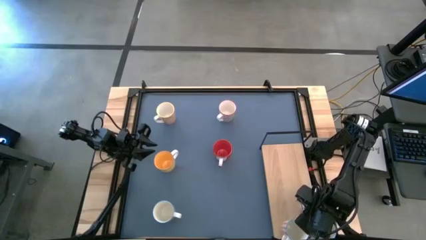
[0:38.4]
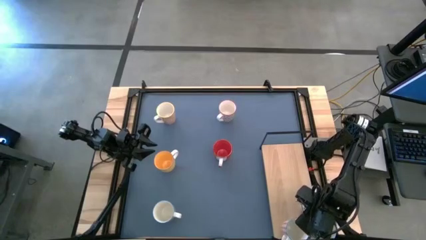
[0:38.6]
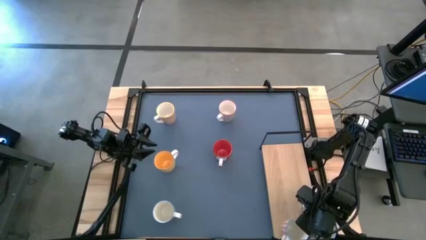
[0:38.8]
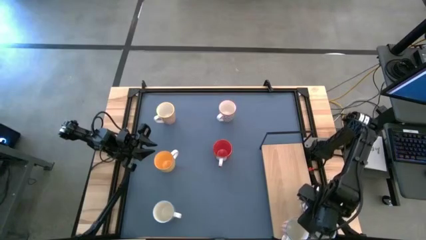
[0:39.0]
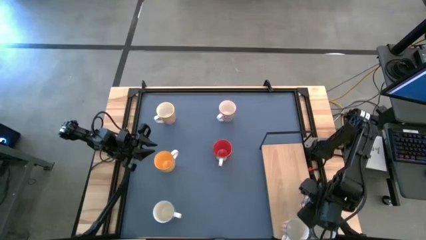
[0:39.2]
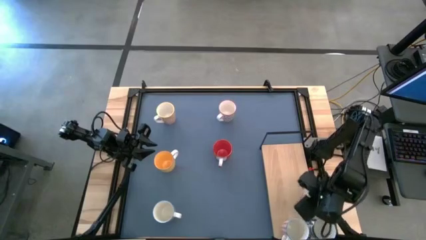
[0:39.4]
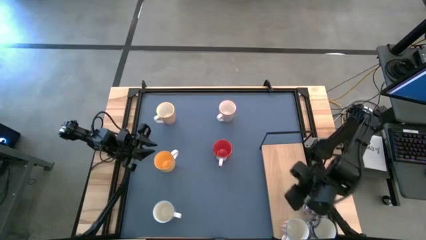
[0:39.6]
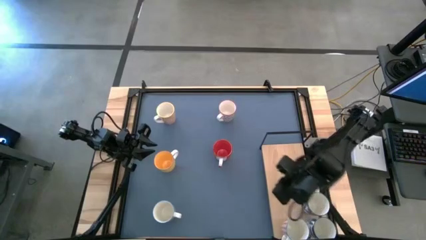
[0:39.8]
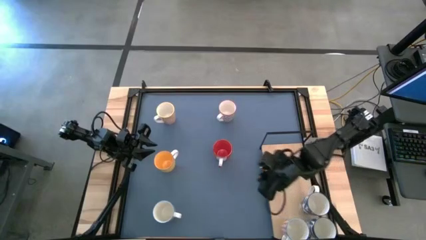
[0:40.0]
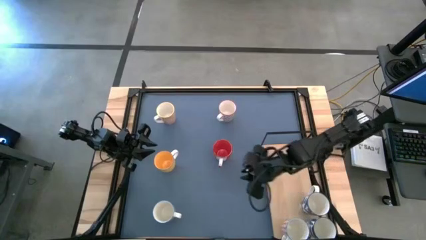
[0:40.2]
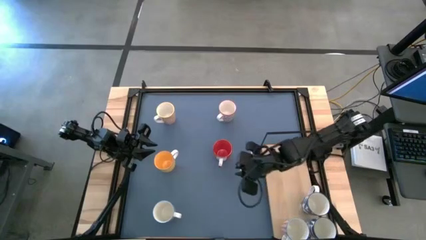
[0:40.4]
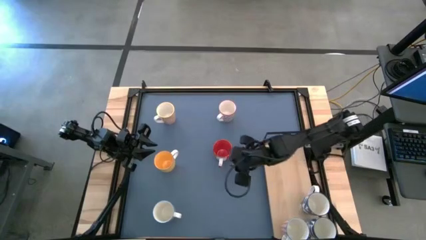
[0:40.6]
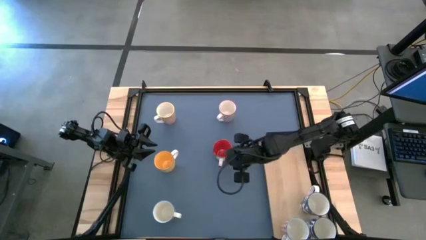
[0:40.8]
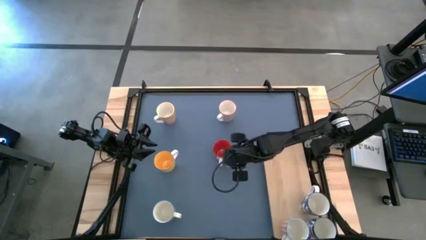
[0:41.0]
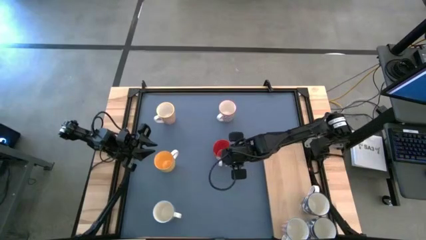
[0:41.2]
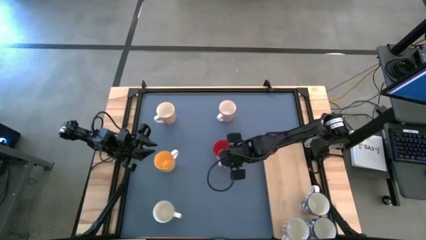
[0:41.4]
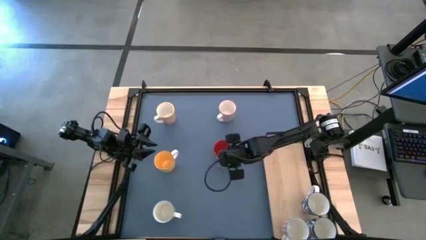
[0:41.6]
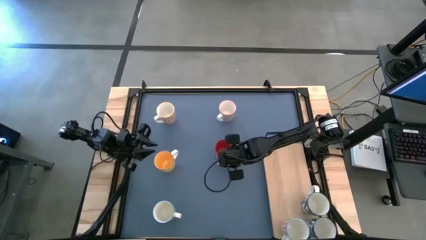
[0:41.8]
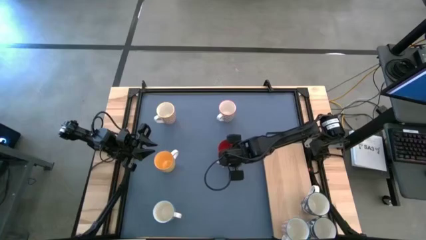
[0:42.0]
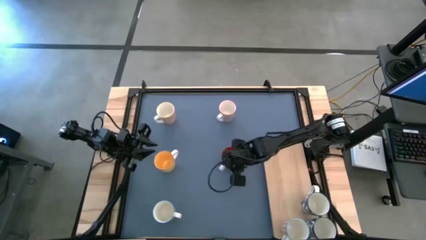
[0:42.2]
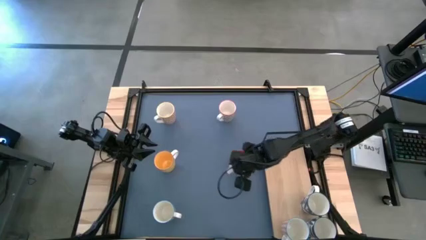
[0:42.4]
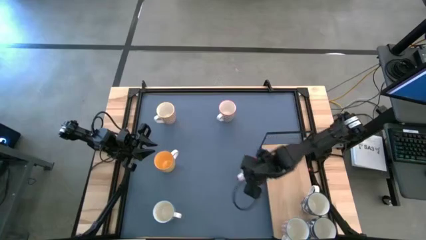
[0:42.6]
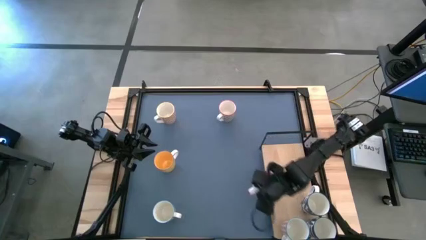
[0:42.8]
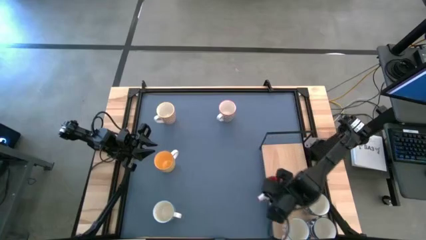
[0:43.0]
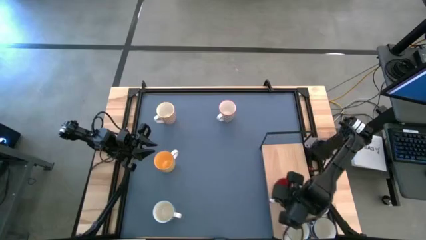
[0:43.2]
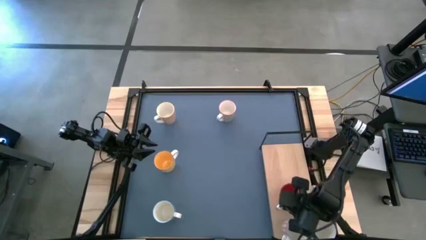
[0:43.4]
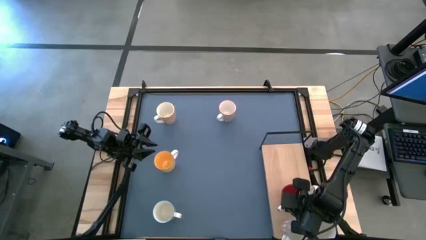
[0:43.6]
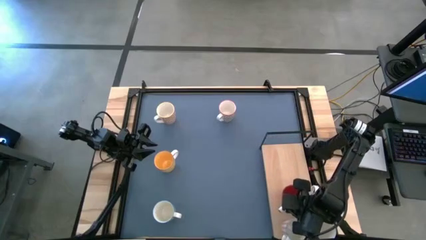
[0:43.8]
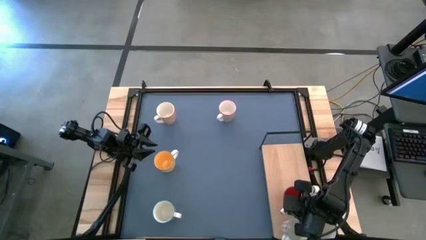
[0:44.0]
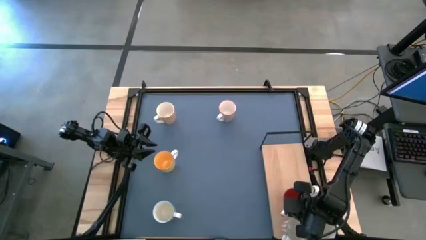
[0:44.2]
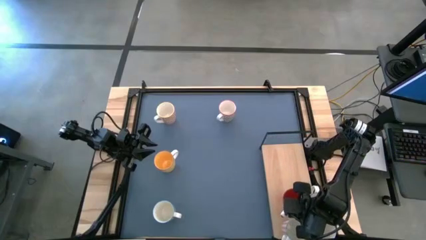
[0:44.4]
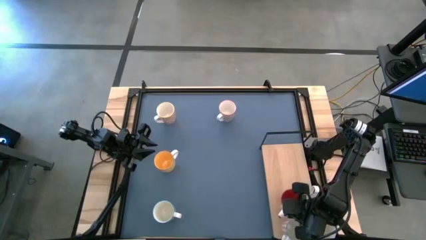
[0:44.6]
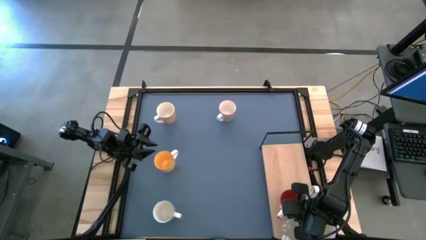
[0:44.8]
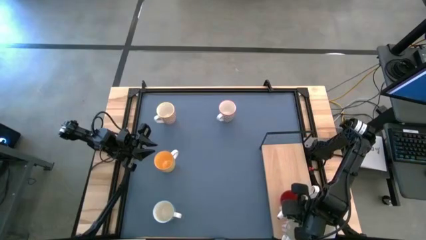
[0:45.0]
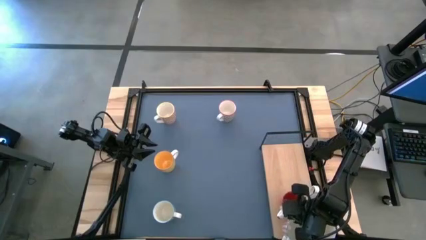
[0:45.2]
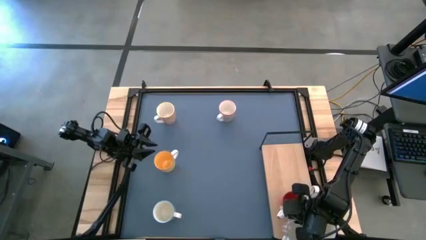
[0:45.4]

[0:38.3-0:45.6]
Task: Place coffee mugs
Put the red mug on the shelf

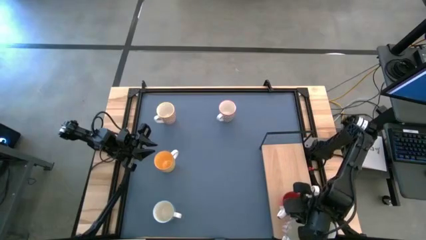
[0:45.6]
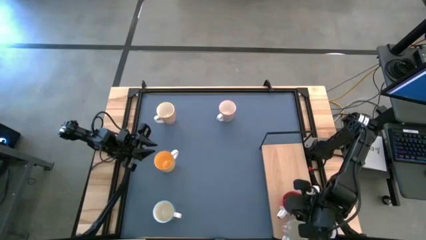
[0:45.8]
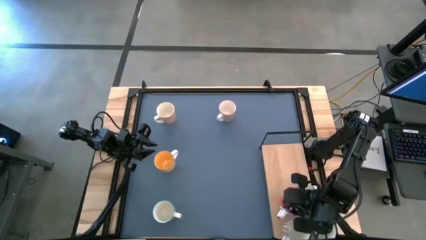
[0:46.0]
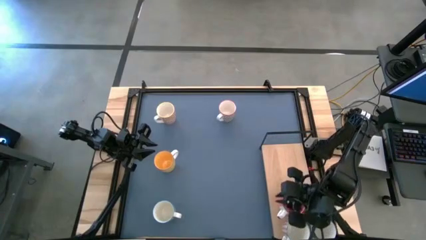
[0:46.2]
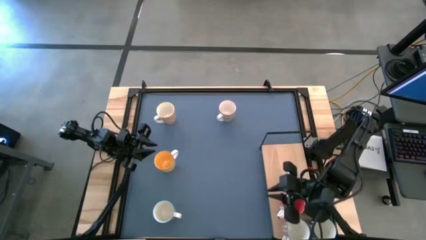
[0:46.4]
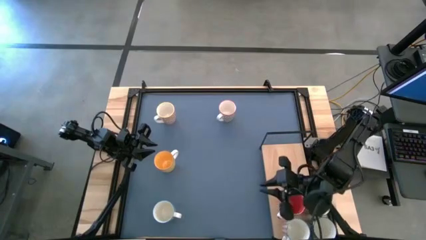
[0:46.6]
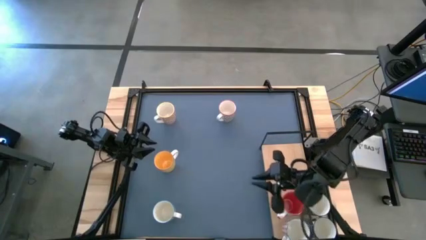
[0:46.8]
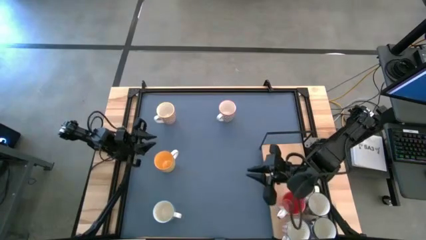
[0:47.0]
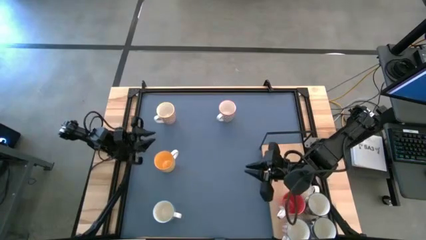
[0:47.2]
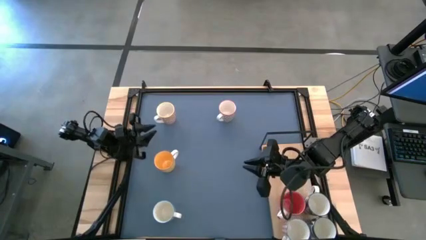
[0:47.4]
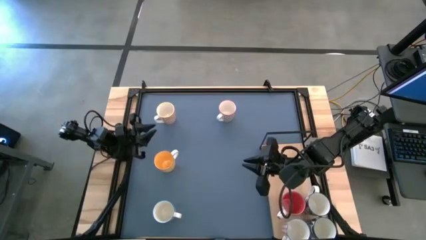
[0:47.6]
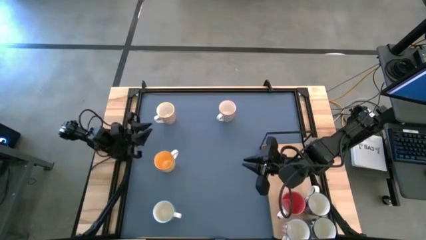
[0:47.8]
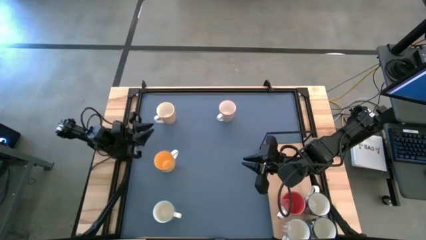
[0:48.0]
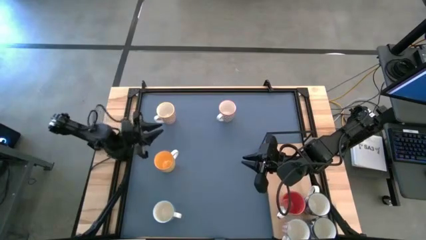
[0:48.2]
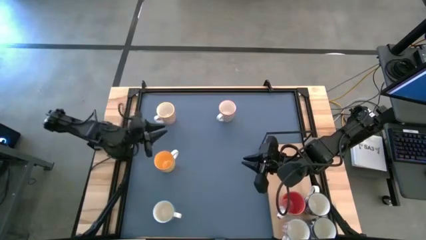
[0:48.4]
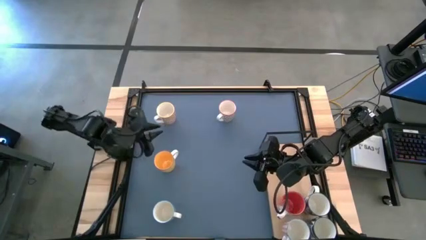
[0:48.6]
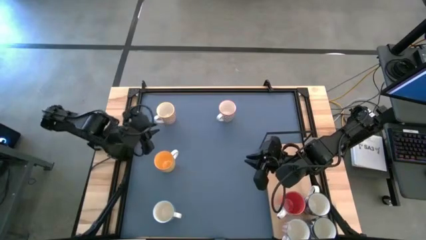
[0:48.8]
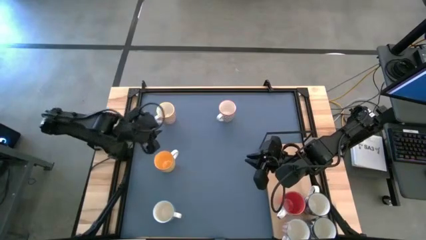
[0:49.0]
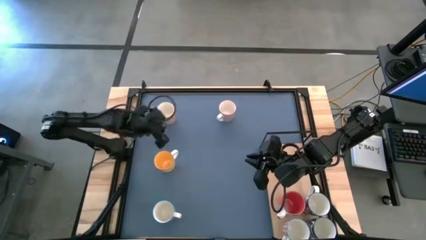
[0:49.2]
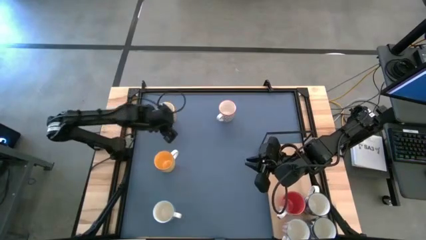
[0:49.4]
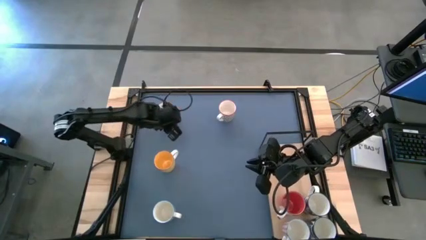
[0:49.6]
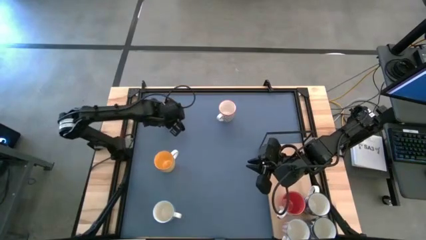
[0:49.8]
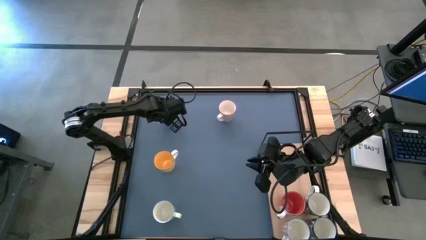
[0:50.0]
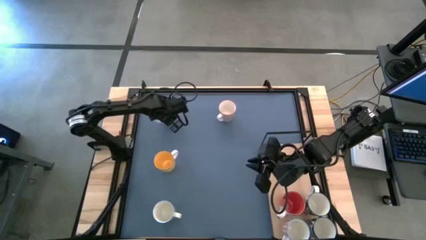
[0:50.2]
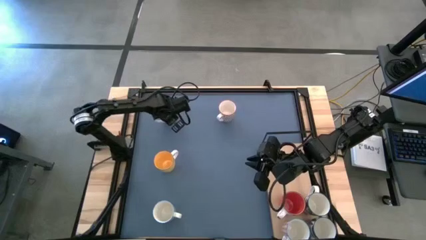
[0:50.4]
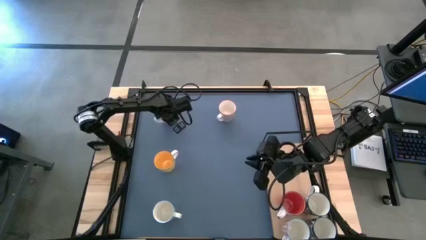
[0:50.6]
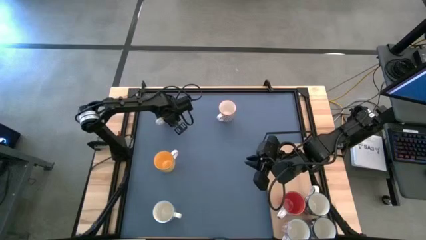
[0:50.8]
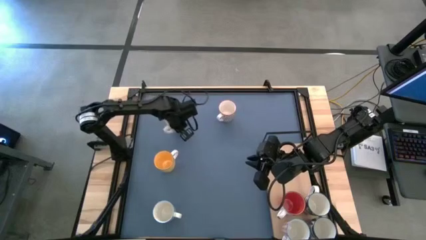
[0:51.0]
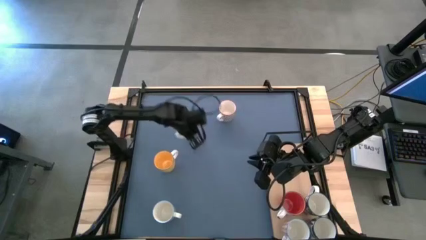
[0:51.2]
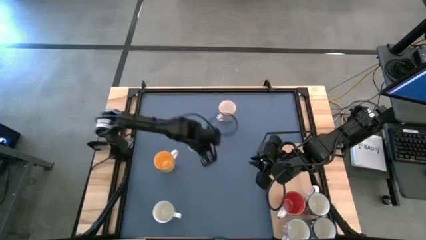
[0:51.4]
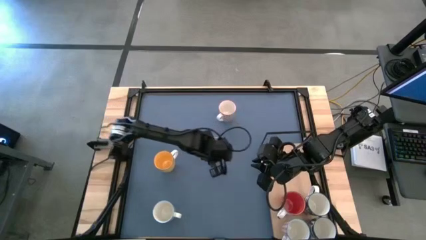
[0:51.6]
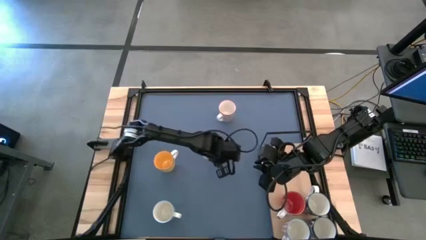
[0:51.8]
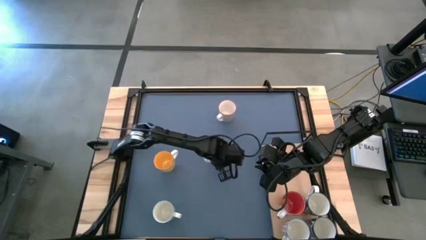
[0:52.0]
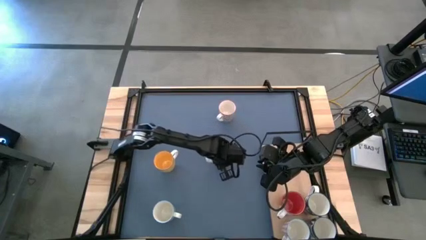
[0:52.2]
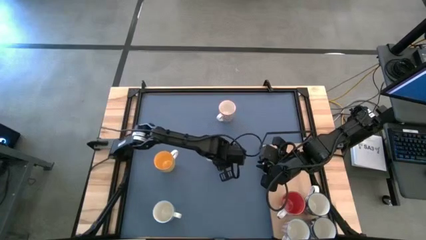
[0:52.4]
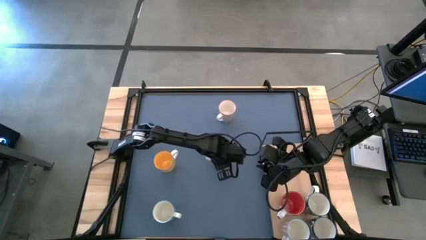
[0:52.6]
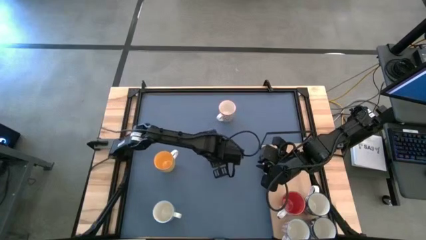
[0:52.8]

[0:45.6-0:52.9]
Move the orange and white pattern mug to the center of the table

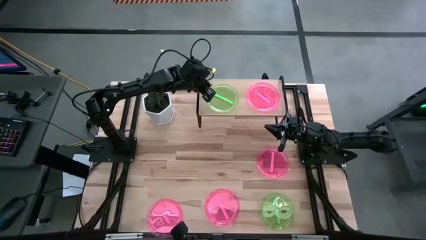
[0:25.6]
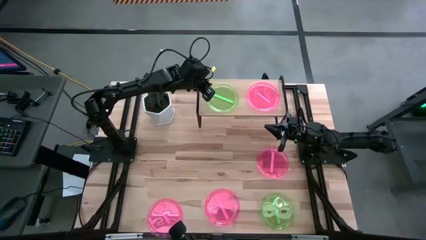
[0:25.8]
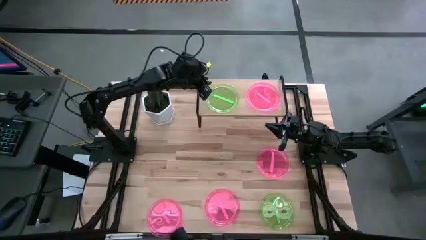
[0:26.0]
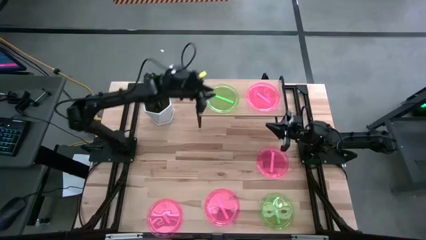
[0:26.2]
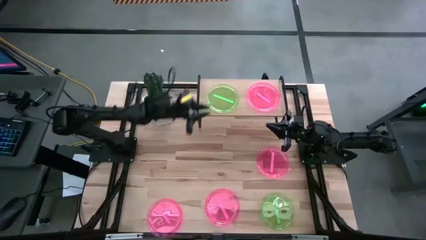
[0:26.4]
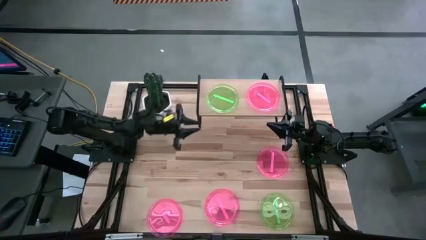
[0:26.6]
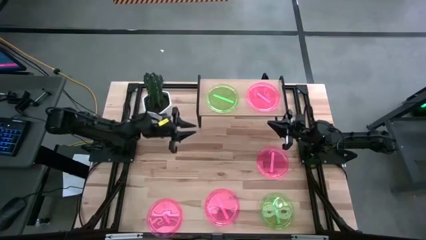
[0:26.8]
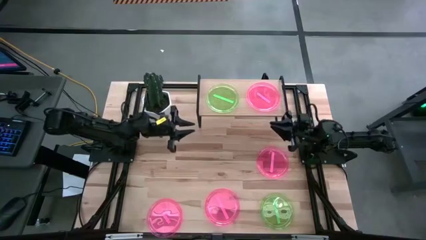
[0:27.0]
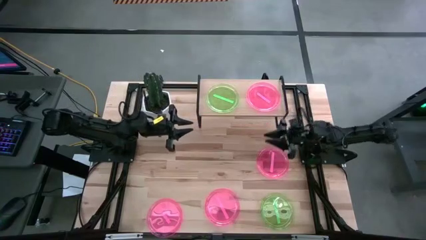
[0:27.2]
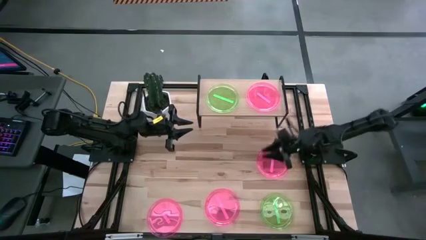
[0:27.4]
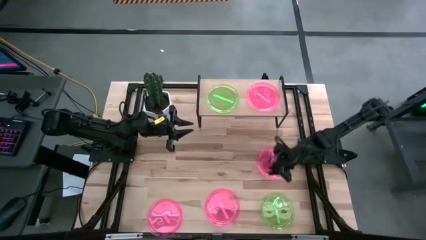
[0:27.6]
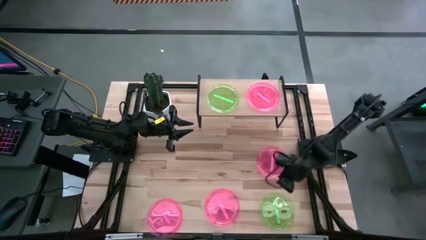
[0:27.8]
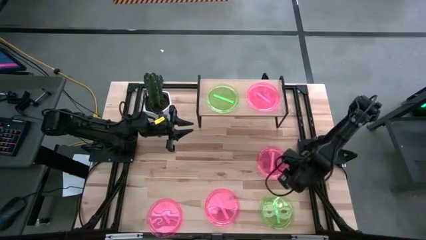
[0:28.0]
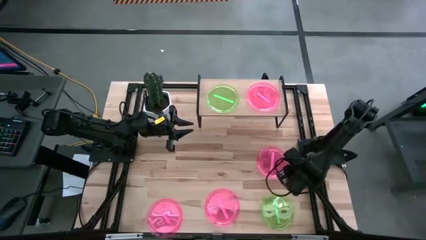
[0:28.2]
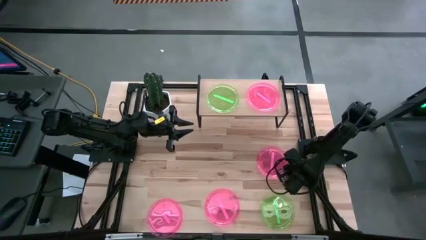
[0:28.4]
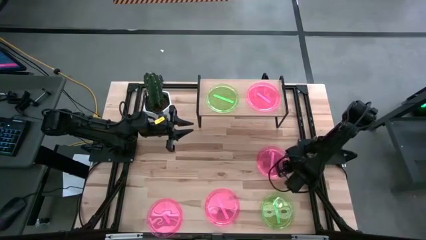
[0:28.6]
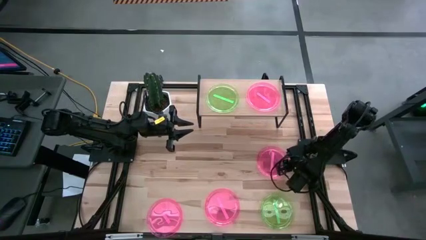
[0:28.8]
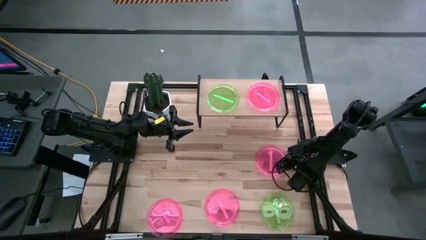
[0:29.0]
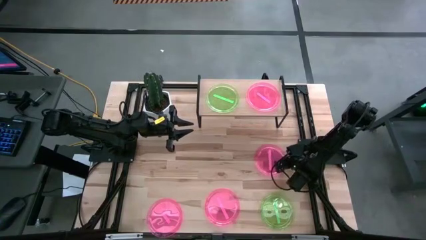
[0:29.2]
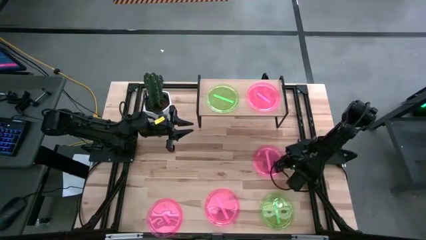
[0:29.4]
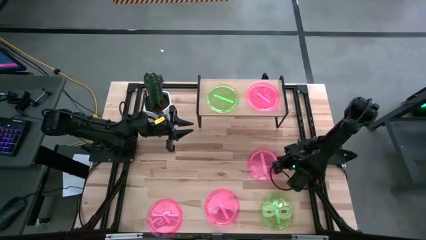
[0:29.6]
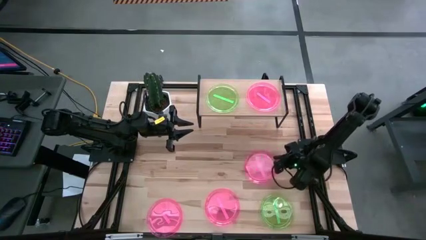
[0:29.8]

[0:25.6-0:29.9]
Task: Place and stack plates onto a shelf
Stack the pink plate on top of the pink plate on the shelf
